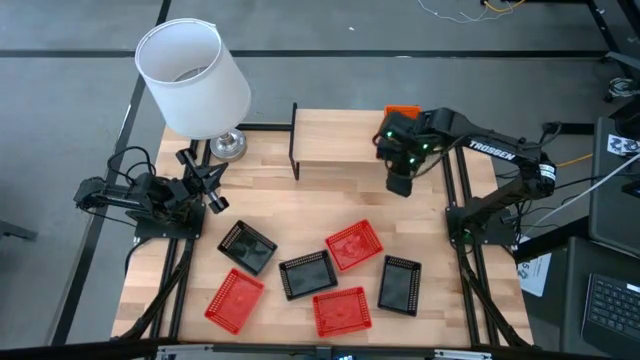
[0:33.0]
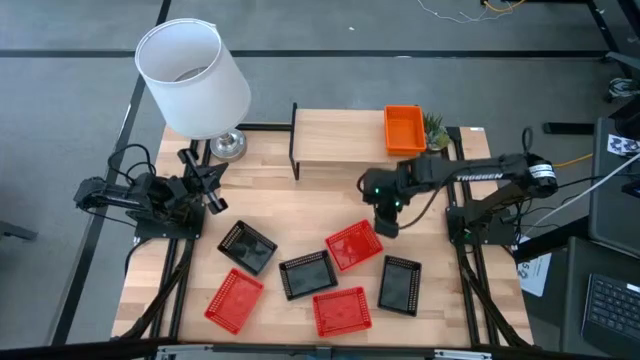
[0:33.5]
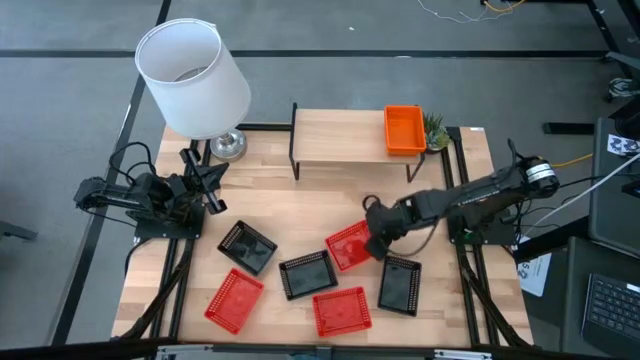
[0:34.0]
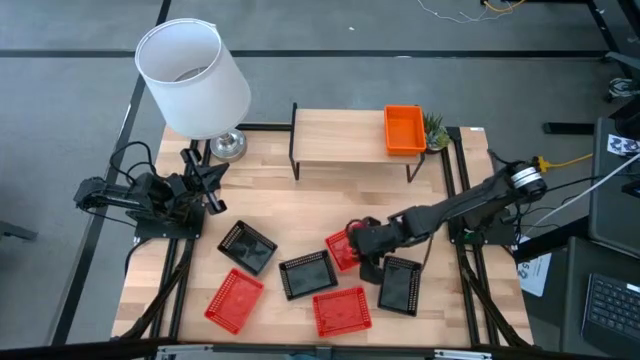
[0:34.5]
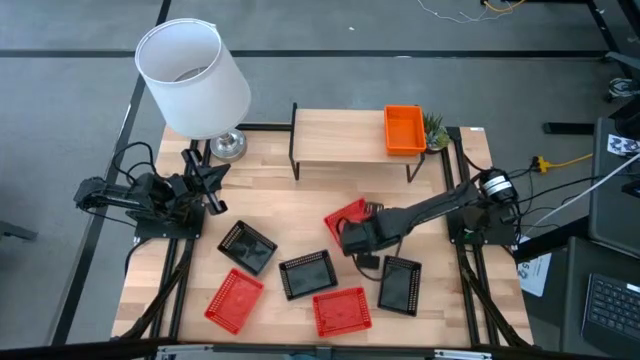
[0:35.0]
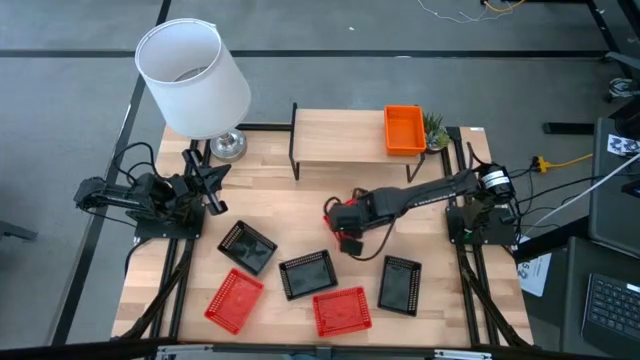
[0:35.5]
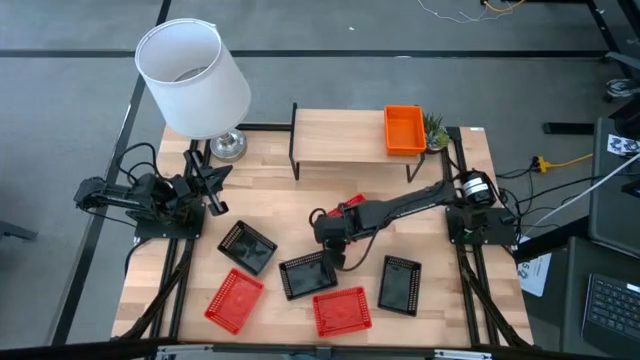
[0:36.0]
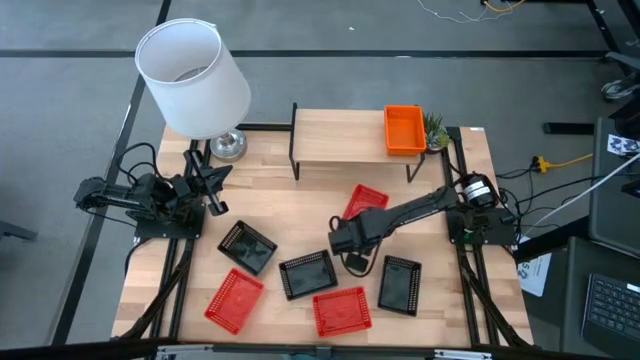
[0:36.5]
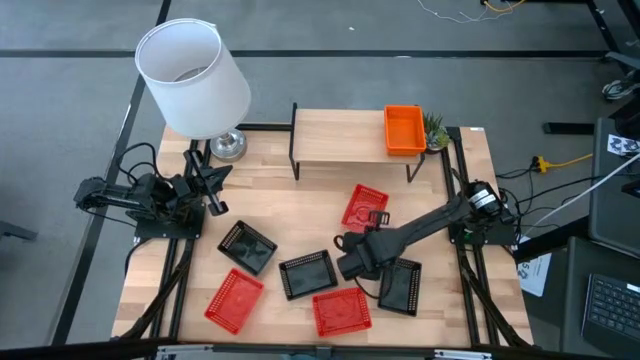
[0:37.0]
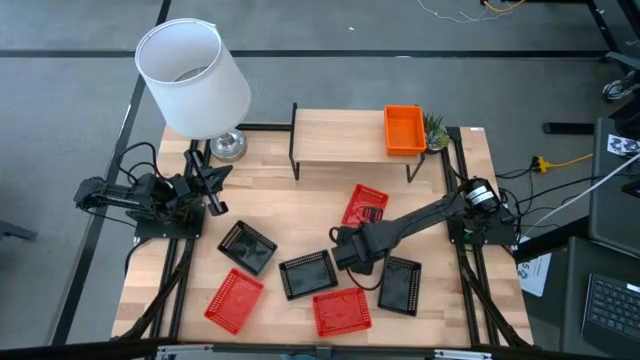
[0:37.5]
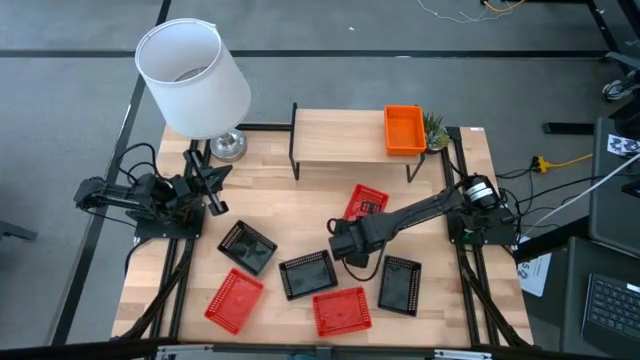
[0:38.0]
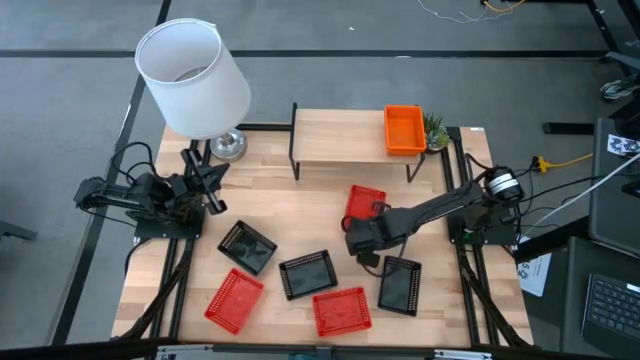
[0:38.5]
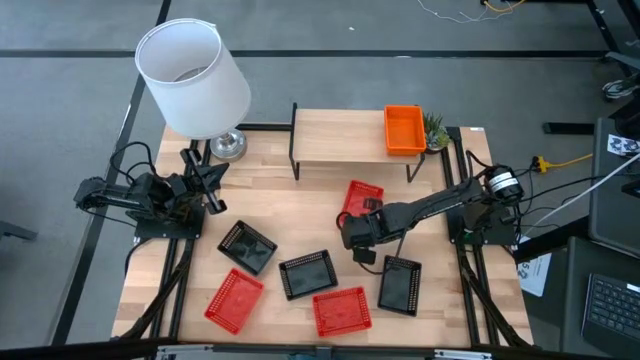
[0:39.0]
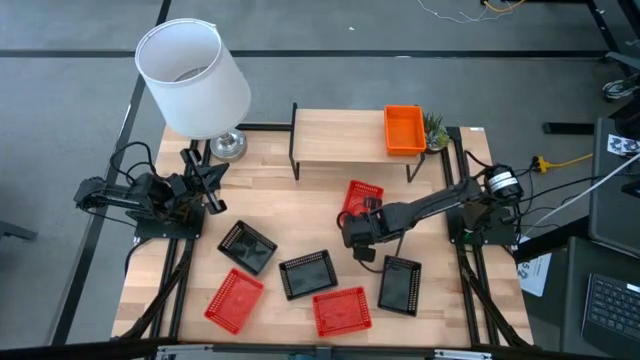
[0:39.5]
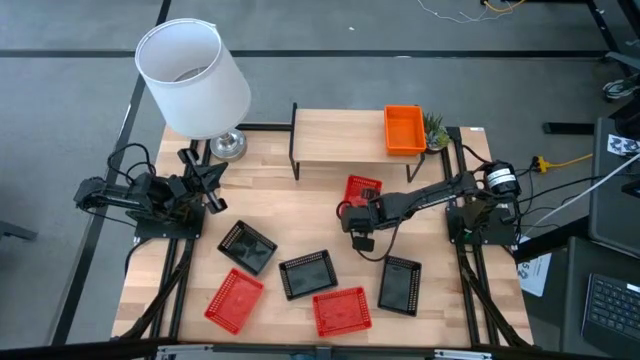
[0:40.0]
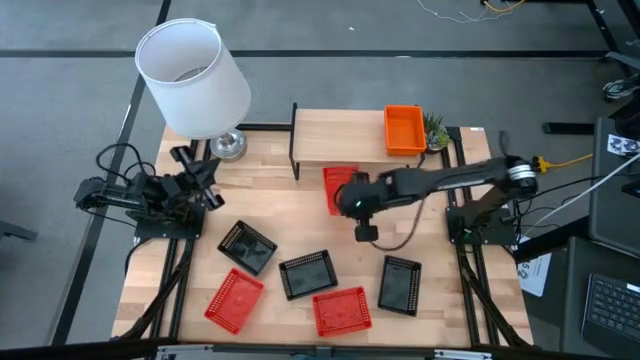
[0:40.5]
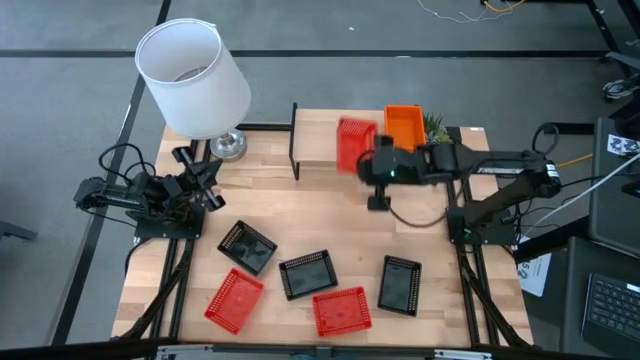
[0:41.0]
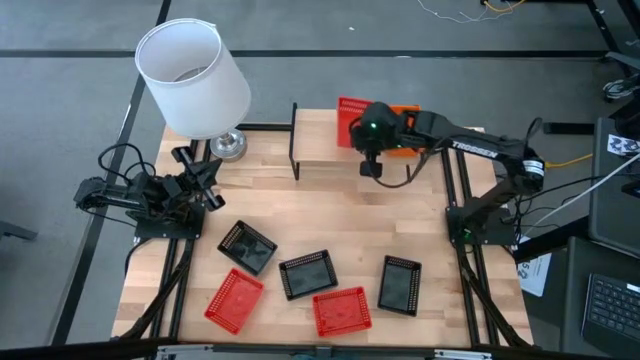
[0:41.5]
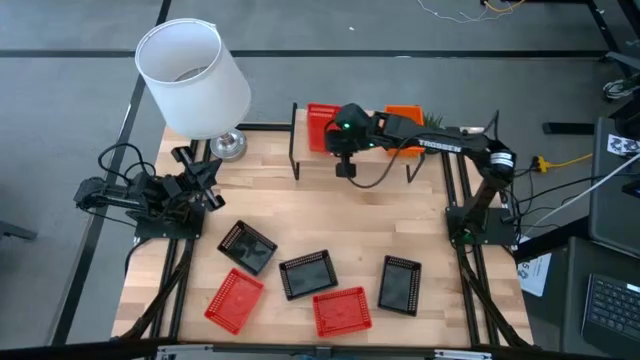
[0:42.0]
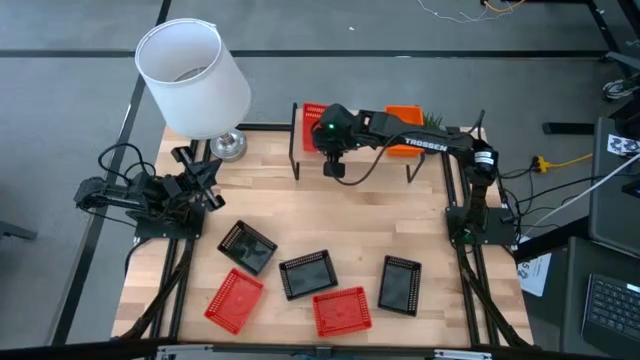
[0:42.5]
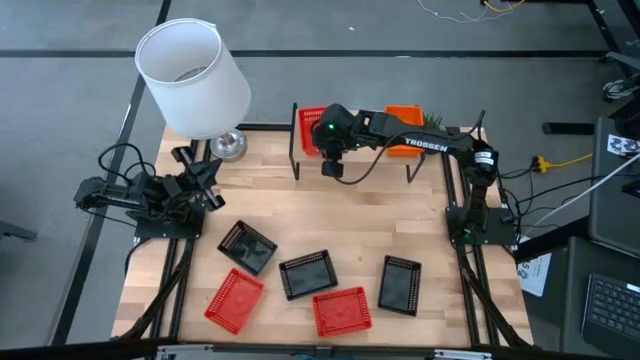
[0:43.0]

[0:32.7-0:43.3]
Task: Stack baskets on shelf by color
Put the top red bin on the shelf

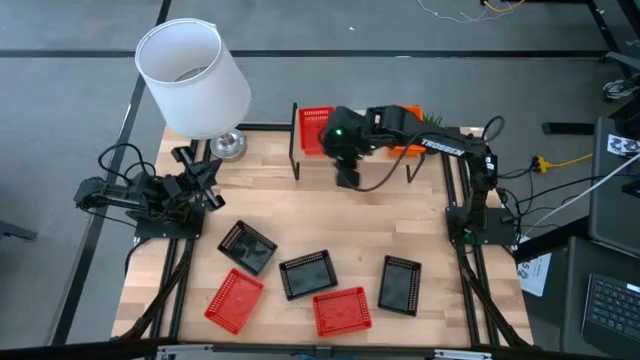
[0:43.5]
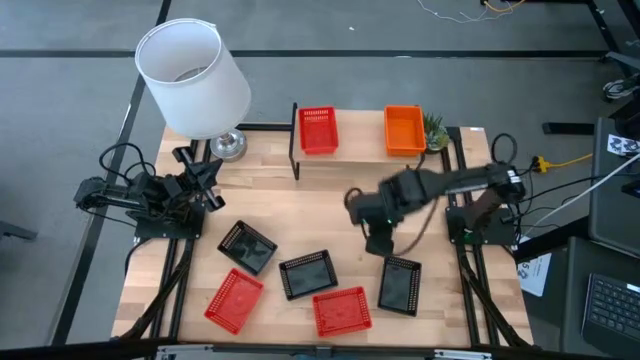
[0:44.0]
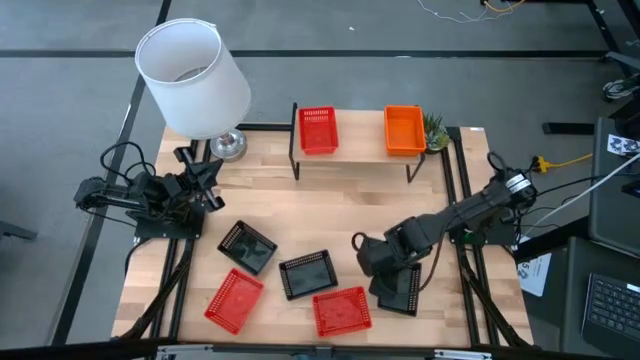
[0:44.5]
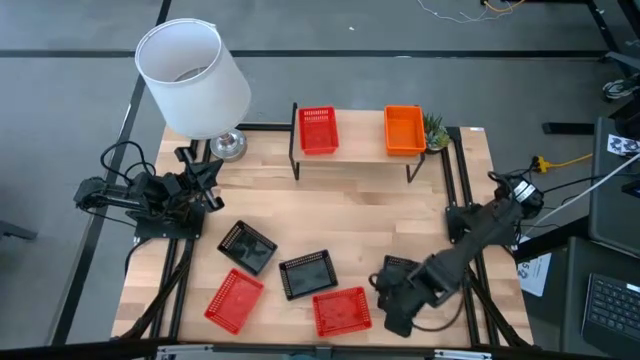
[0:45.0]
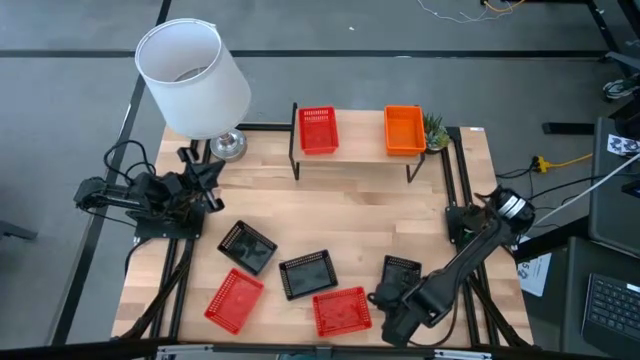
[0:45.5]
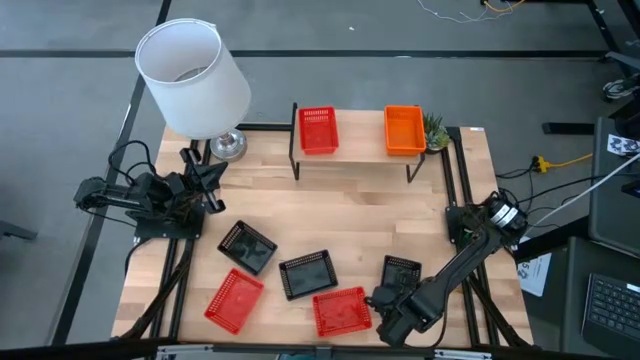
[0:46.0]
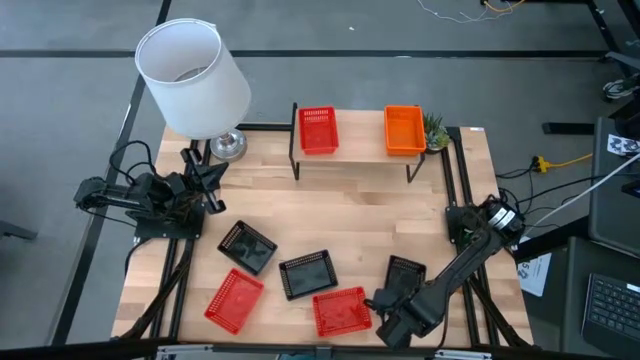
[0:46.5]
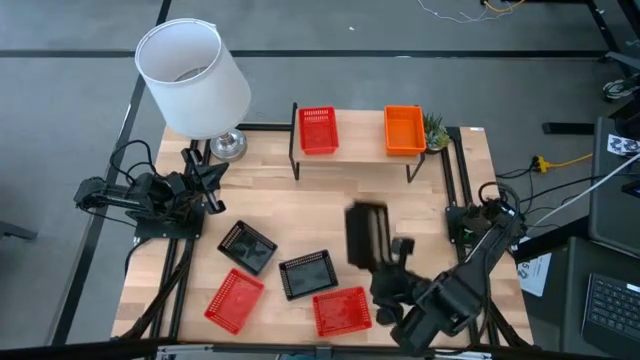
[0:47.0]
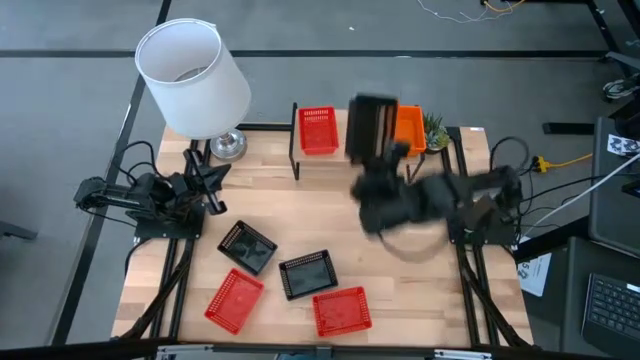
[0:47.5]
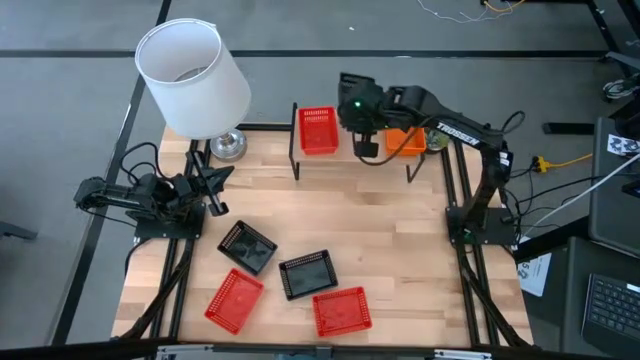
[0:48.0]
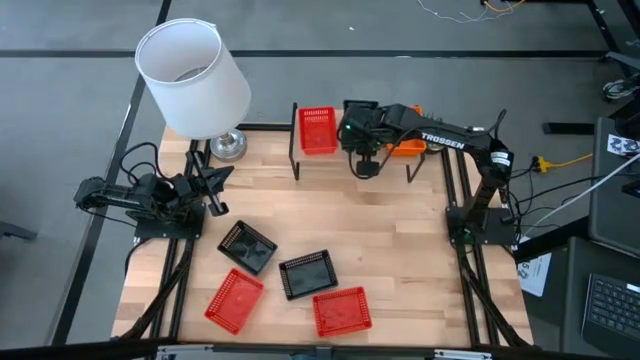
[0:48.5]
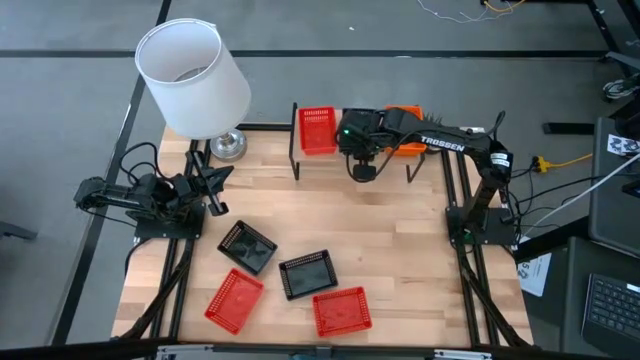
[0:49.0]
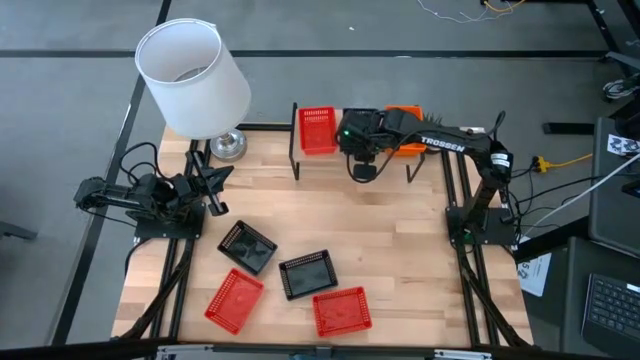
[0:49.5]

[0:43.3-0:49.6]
Put the right black bin on the shelf

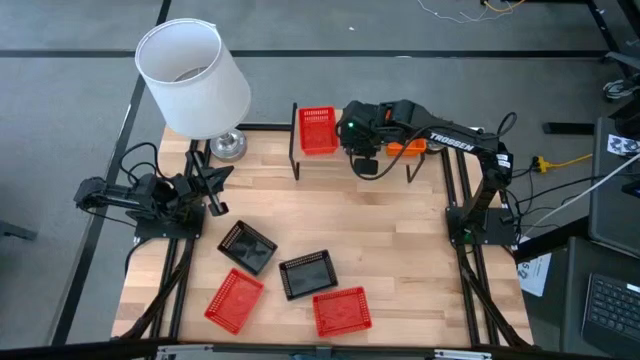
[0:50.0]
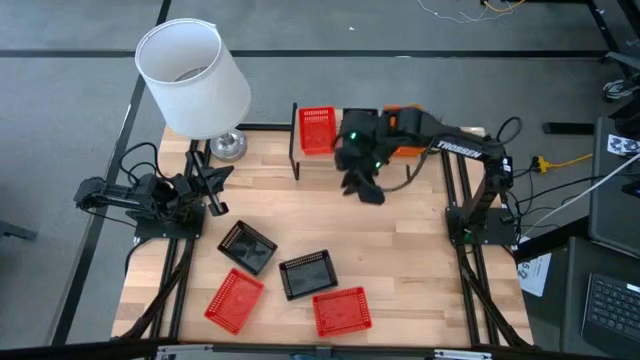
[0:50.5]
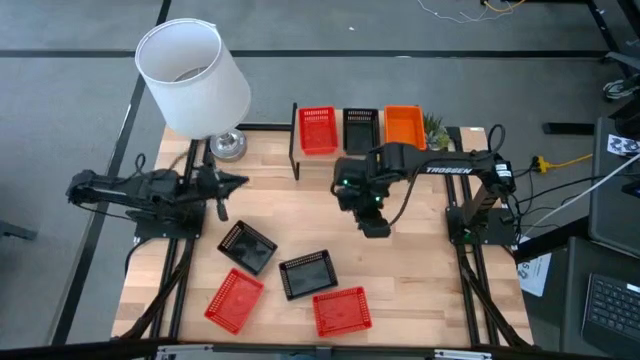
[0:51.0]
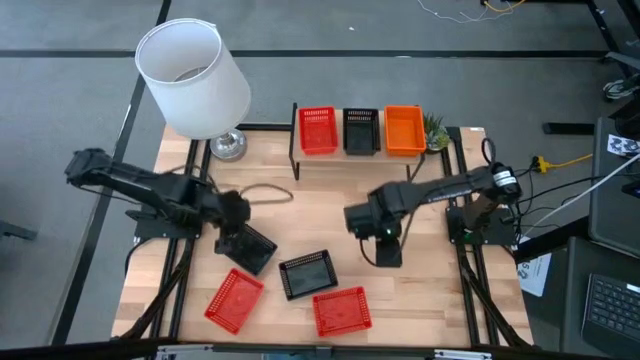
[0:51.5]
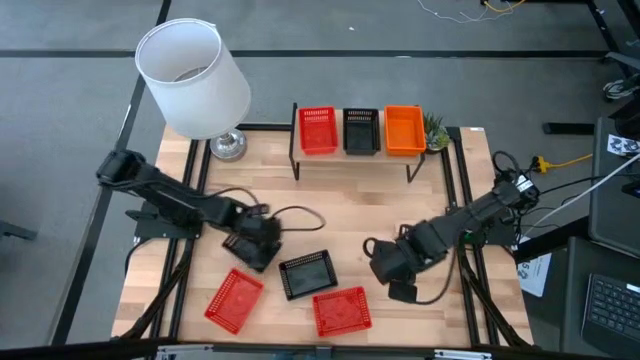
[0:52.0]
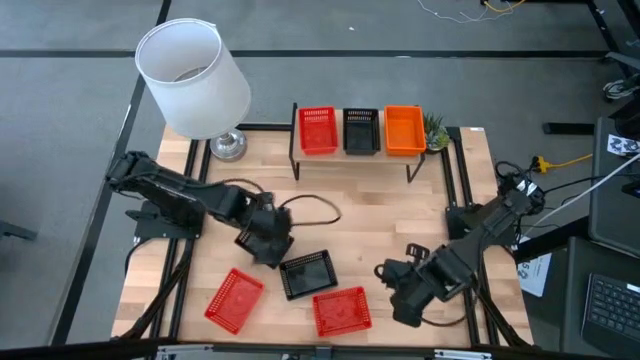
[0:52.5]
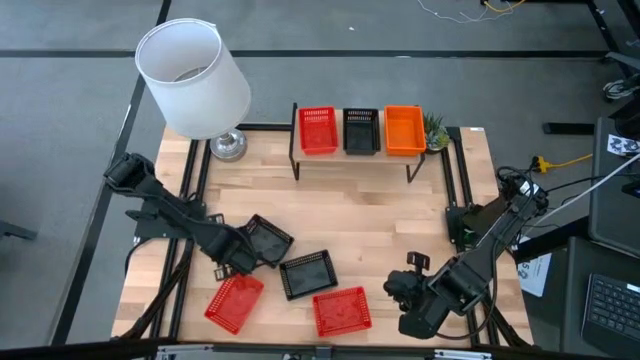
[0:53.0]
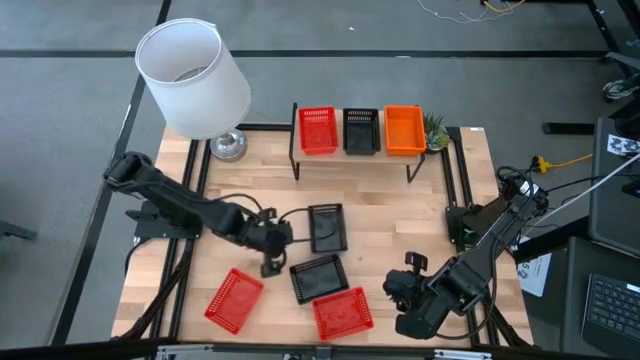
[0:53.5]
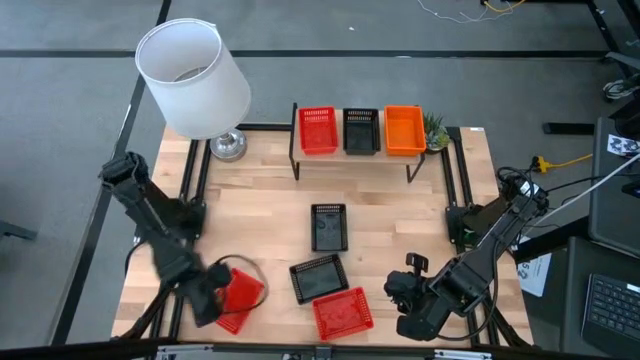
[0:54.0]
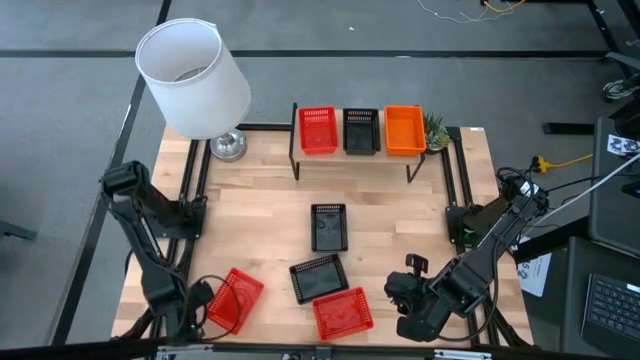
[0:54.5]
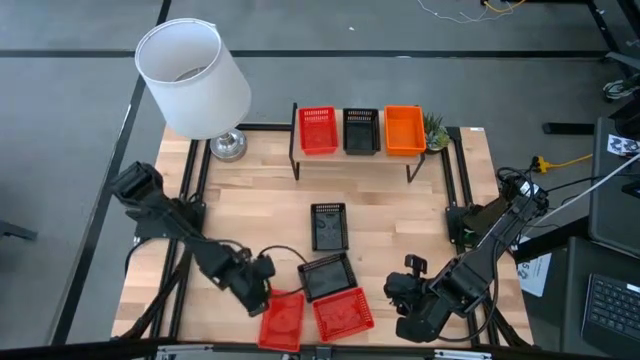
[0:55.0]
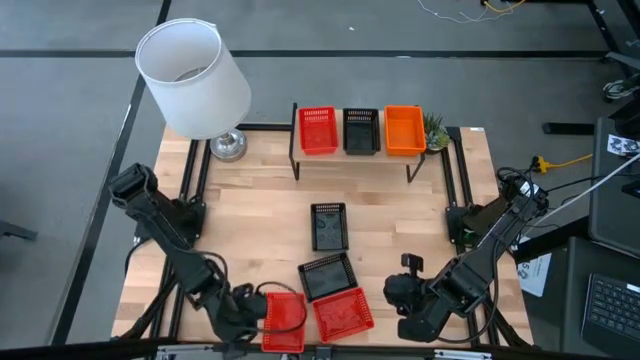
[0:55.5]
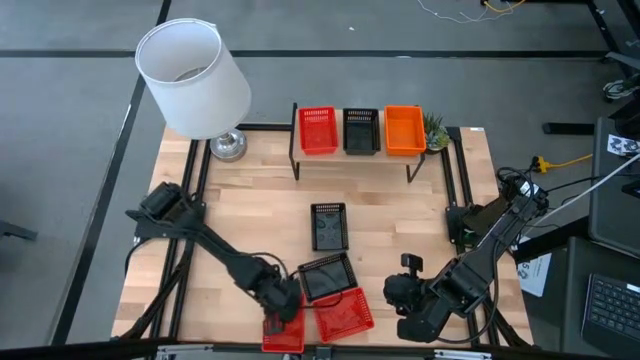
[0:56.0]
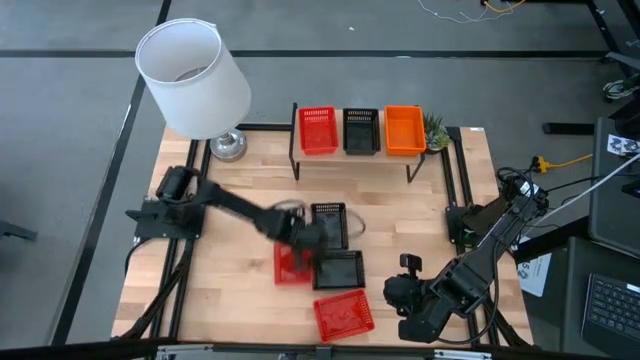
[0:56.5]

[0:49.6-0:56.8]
Move the bins to the center of the table
